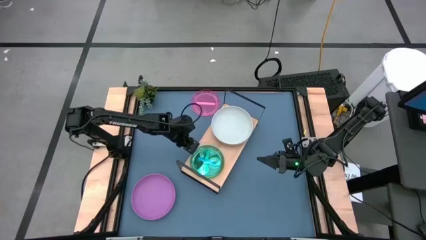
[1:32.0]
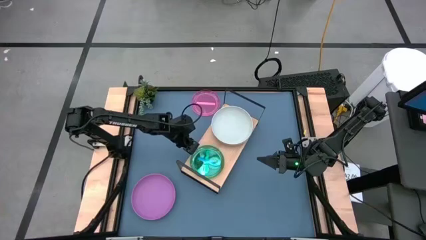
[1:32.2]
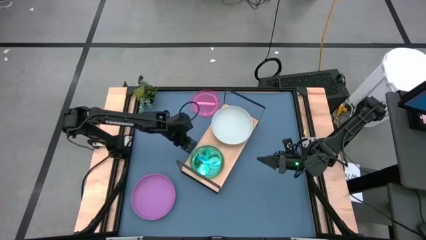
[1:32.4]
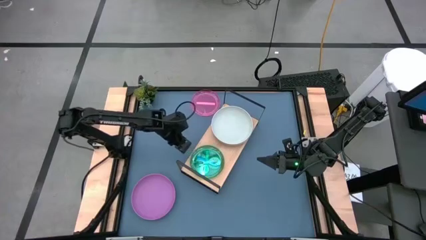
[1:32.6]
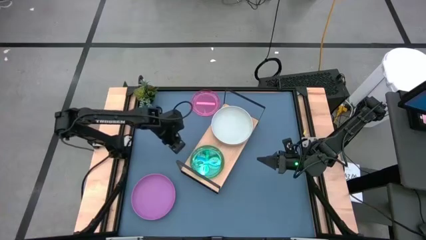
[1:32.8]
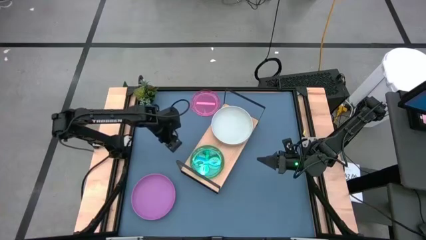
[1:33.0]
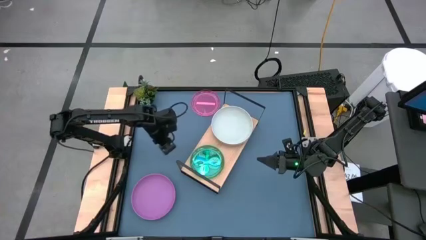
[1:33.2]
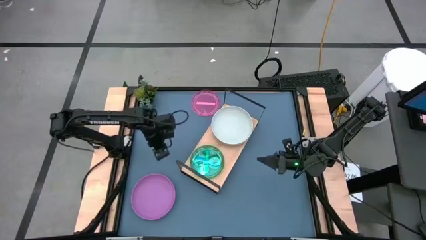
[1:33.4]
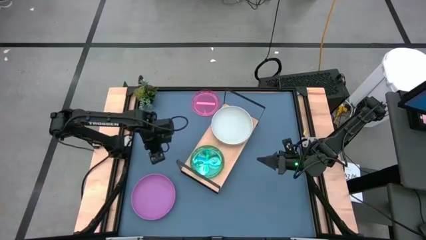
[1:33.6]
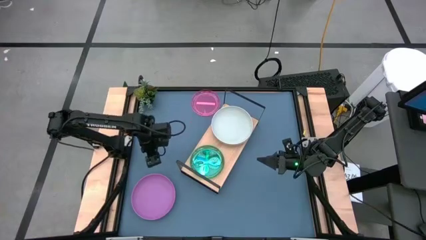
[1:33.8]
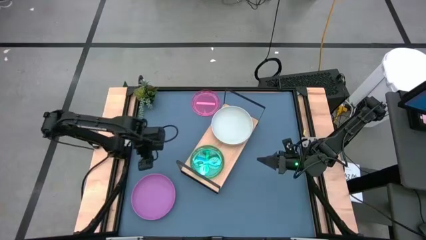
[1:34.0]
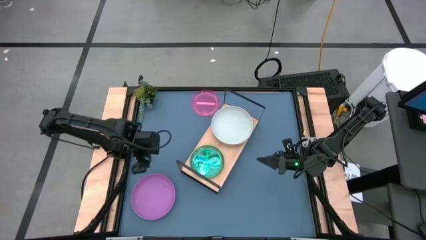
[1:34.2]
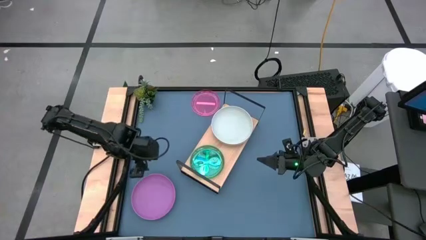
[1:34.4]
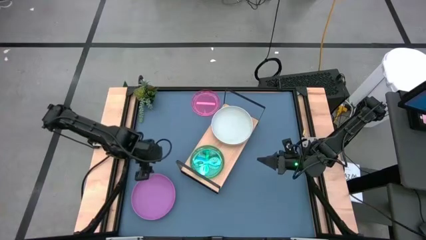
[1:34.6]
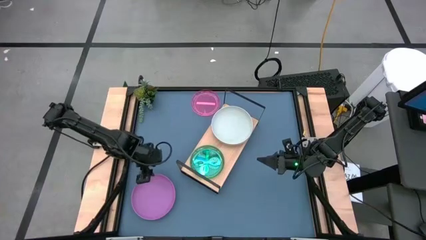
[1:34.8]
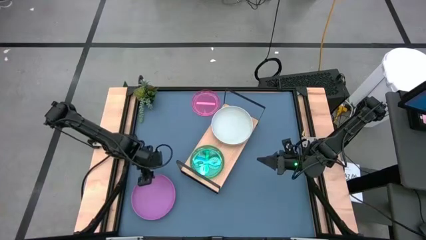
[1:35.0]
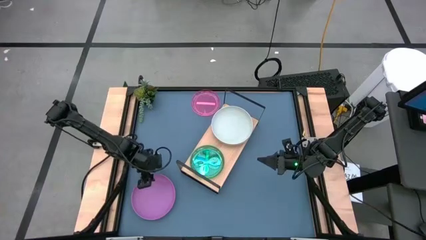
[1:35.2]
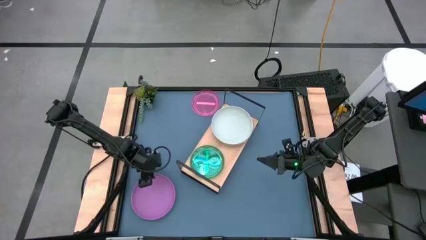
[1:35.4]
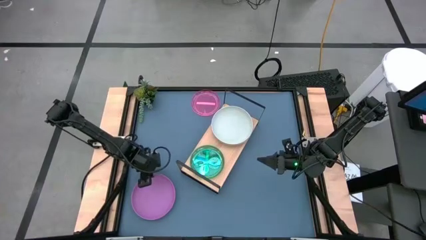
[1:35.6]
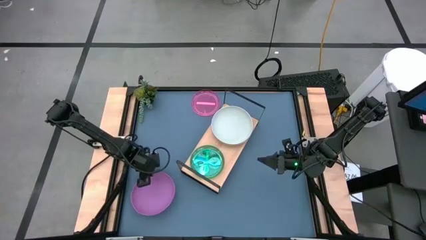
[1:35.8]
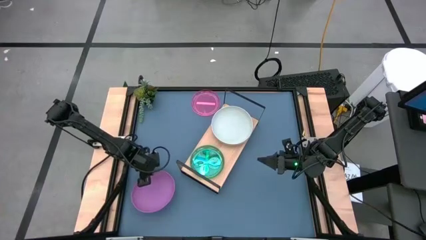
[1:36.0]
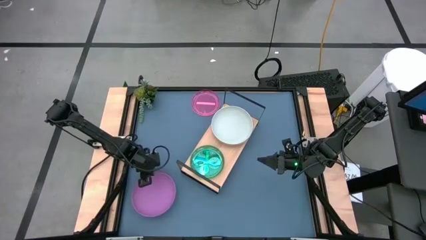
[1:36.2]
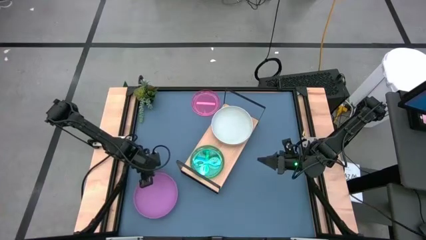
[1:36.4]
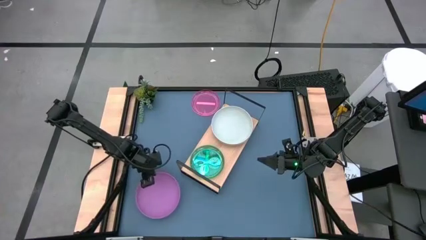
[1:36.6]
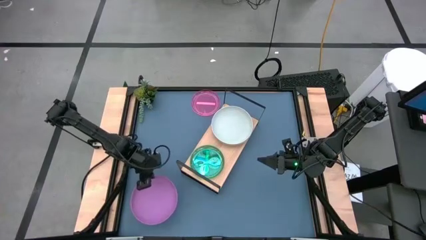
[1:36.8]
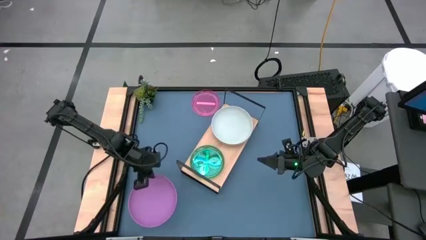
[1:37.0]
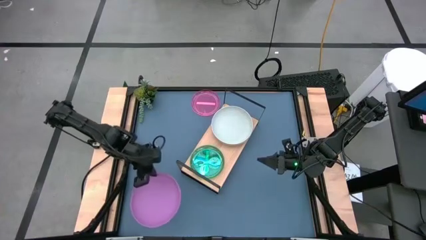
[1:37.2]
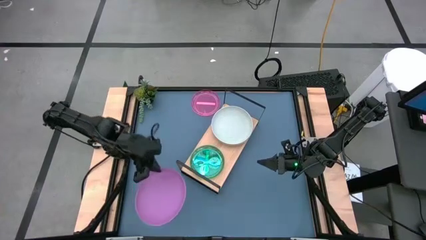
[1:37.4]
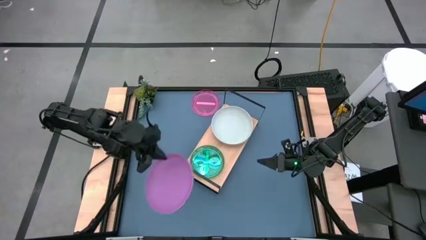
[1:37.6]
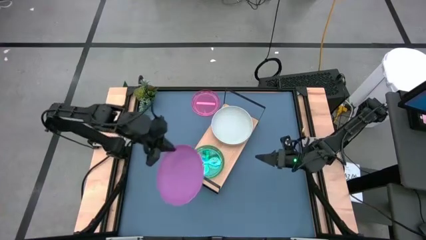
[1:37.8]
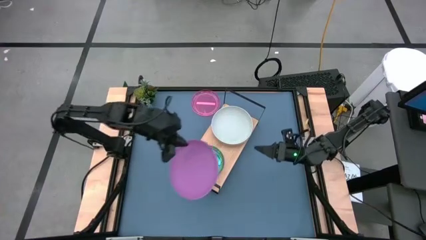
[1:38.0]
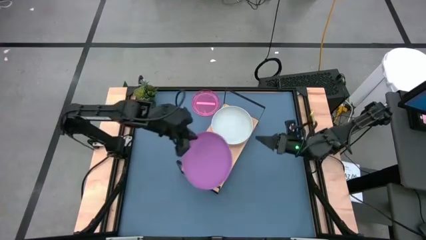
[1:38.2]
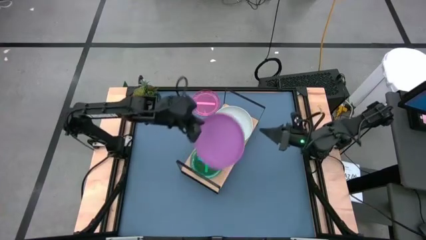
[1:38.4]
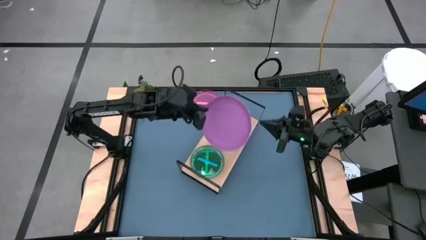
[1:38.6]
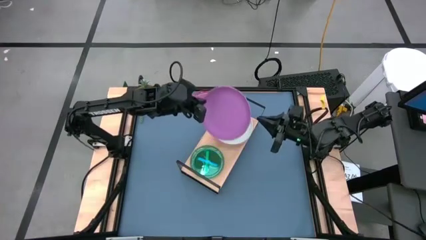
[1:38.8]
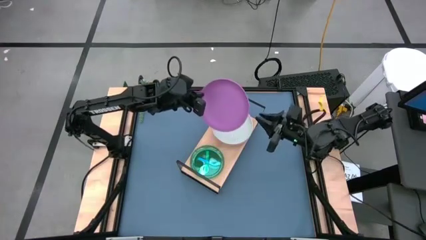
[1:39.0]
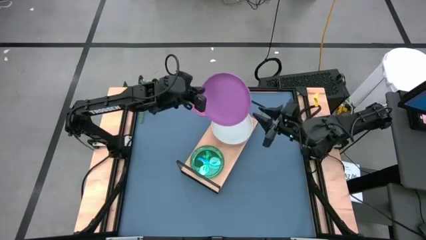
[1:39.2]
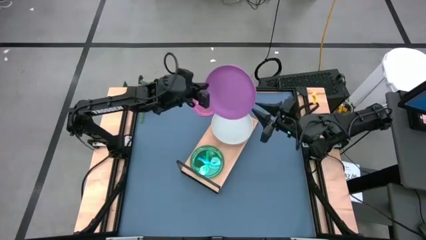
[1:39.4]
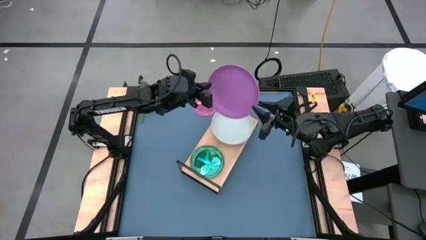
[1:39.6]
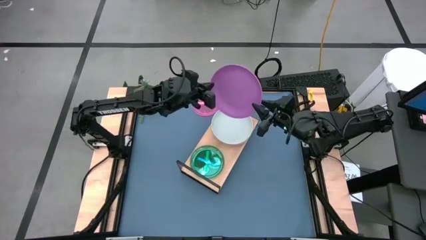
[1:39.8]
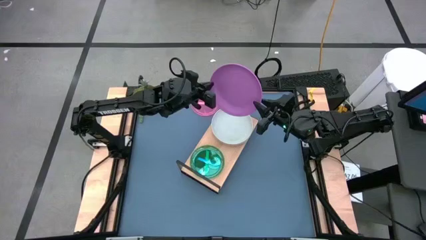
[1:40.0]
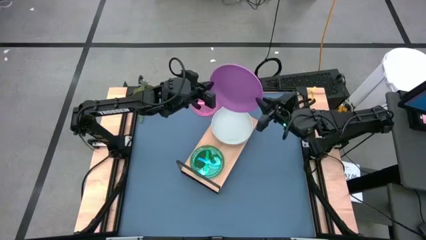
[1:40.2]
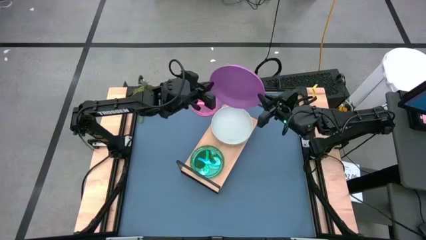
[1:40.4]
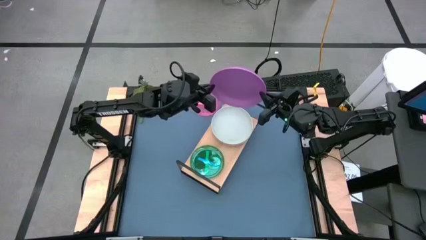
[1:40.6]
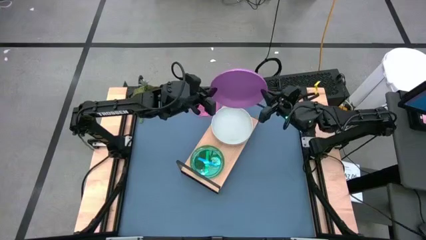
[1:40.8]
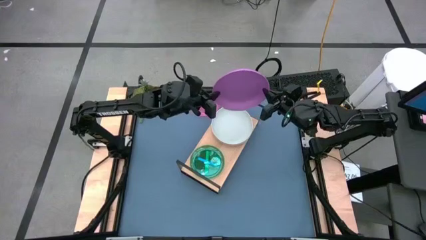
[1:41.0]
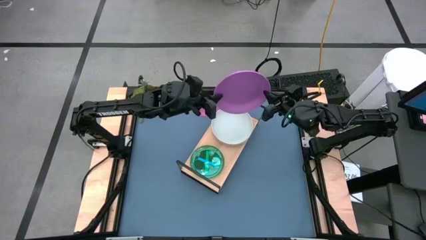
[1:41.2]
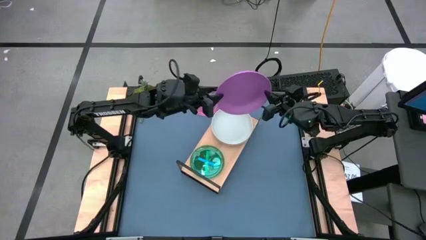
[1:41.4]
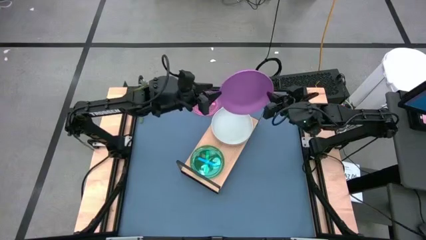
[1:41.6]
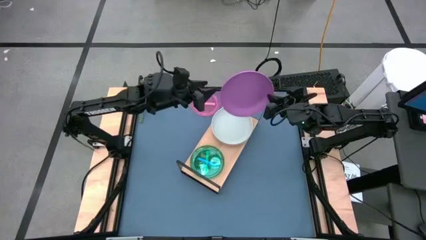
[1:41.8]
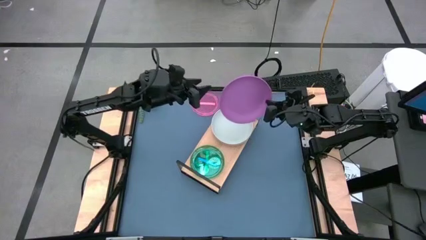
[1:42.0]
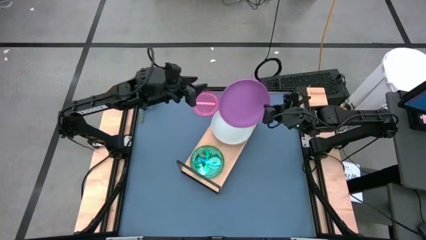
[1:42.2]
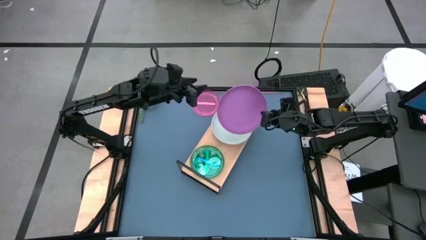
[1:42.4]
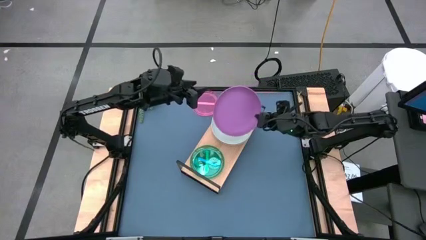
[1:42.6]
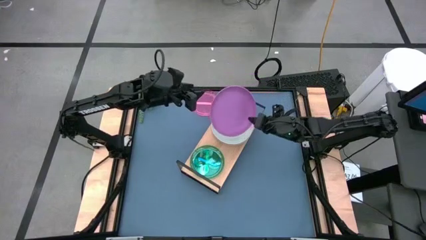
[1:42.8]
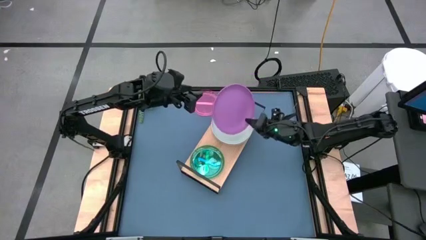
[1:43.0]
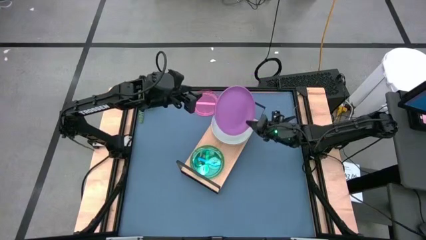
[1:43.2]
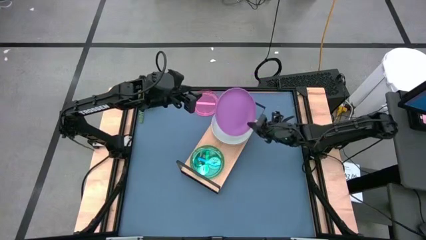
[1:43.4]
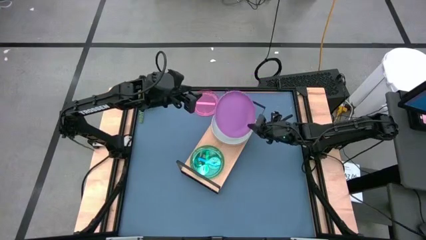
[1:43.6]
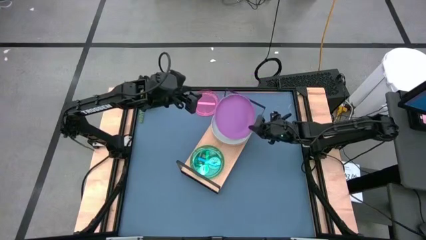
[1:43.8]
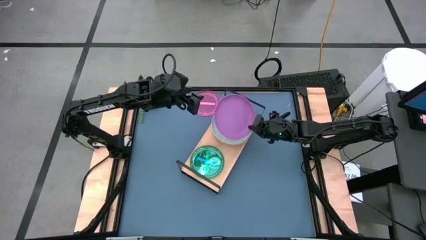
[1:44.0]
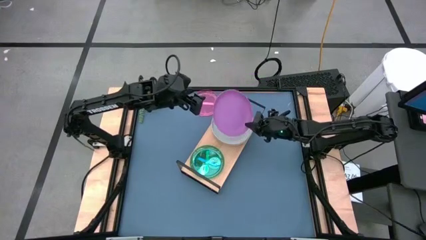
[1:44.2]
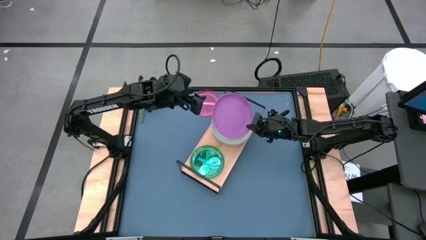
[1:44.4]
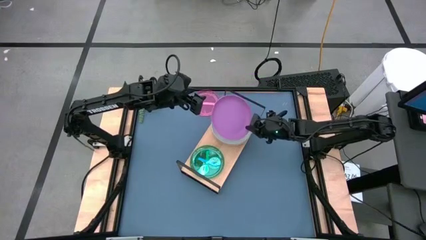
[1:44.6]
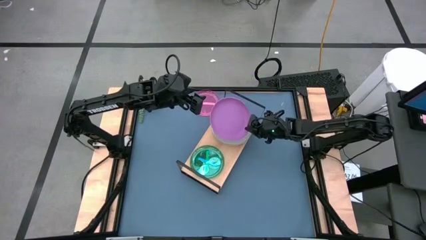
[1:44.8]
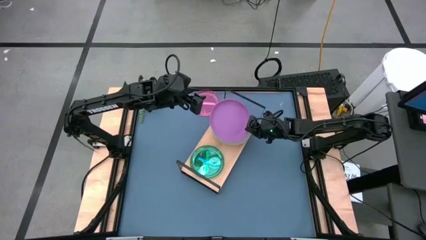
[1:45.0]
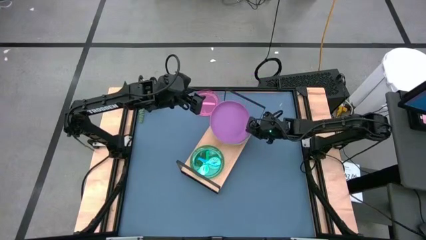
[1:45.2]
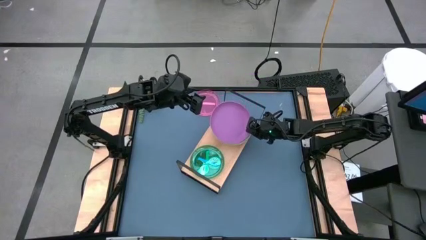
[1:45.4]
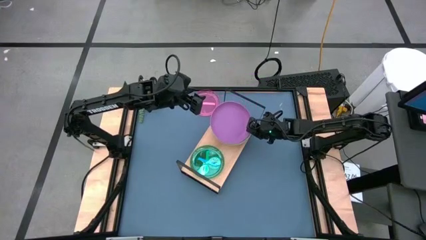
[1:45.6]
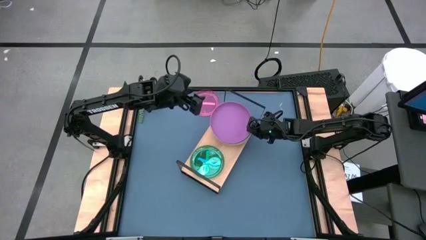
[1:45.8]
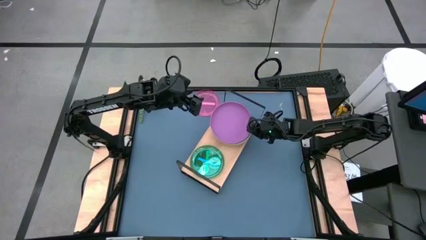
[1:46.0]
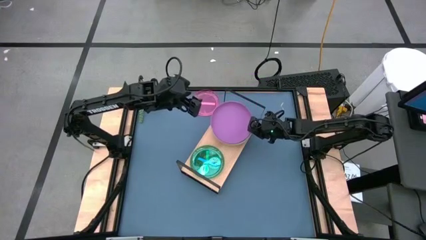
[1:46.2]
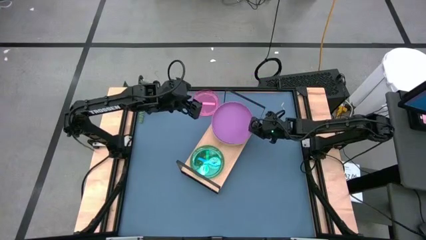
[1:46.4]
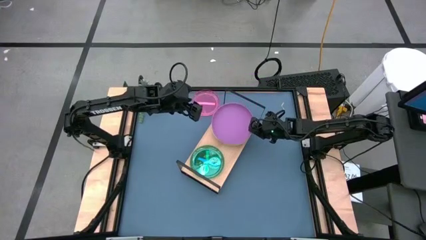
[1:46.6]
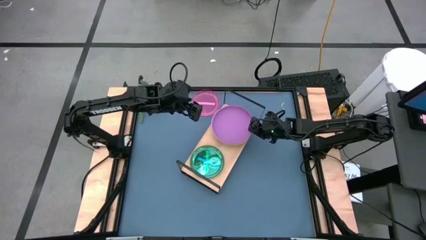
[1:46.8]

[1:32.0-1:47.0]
Task: Place and stack plates onto a shelf
Stack the purple plate on top of the light gray plate on the shelf
